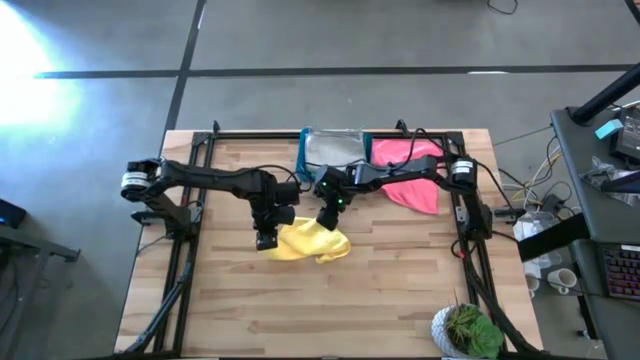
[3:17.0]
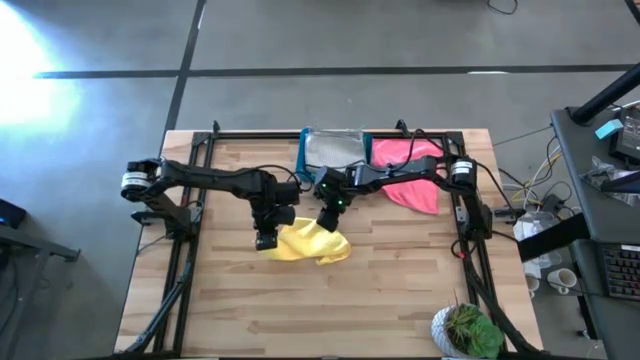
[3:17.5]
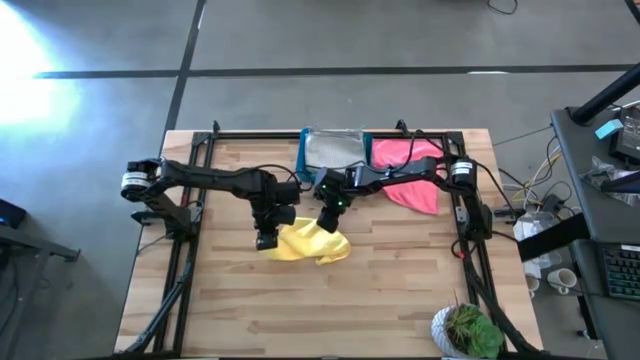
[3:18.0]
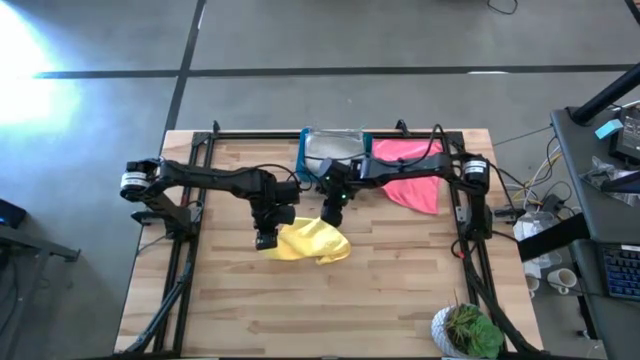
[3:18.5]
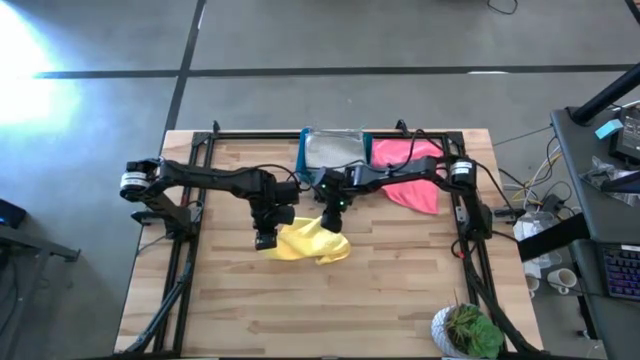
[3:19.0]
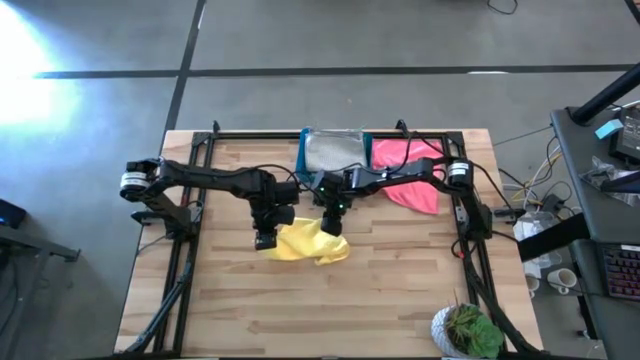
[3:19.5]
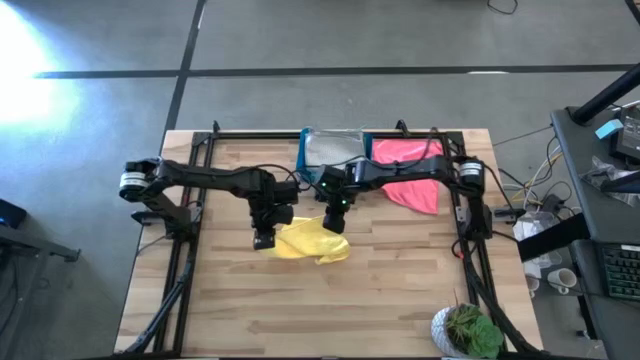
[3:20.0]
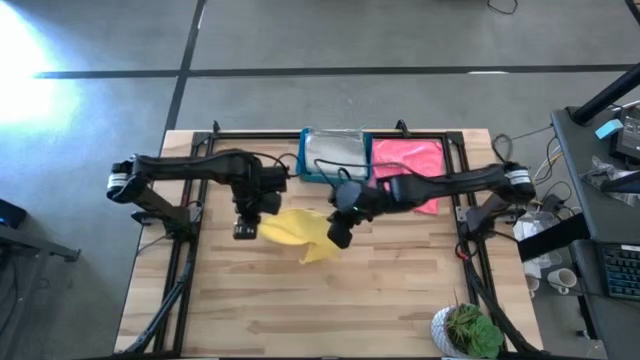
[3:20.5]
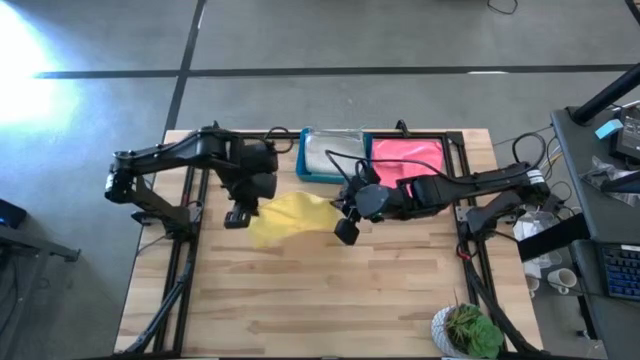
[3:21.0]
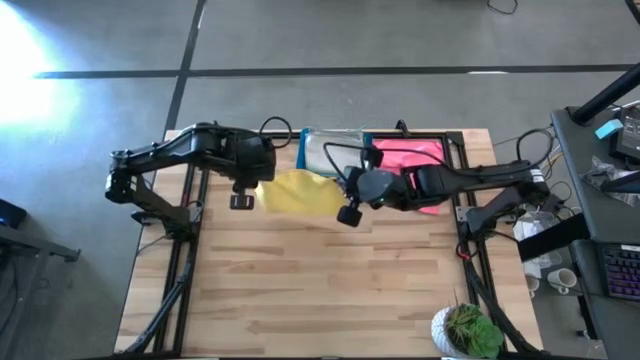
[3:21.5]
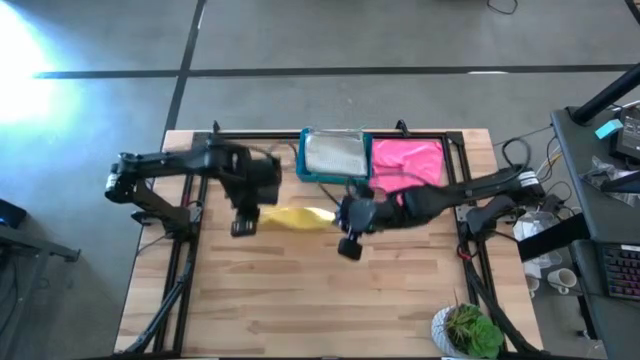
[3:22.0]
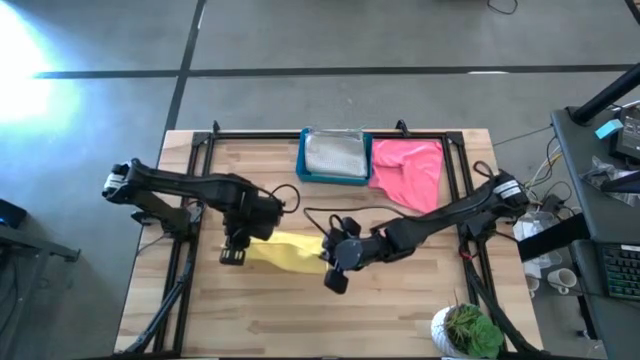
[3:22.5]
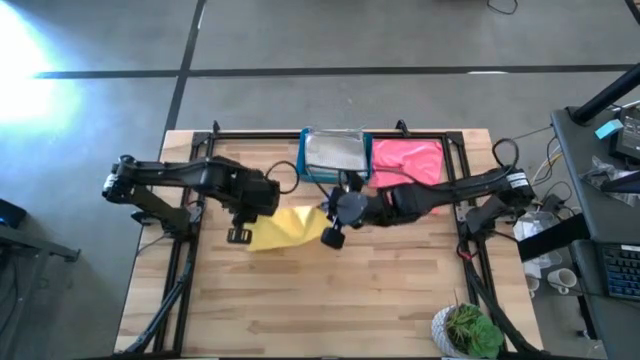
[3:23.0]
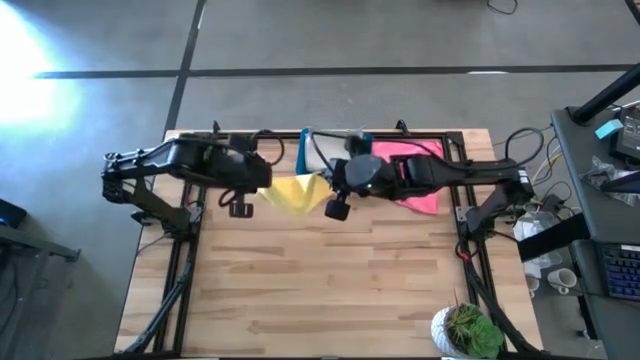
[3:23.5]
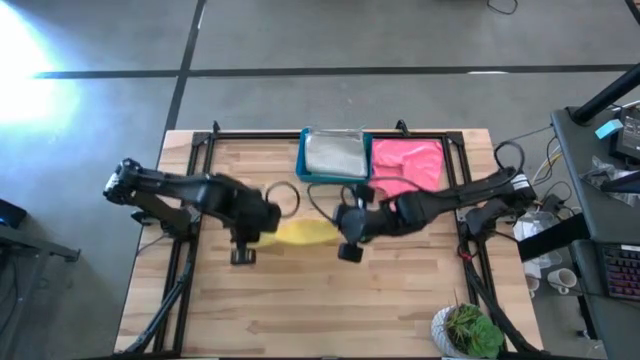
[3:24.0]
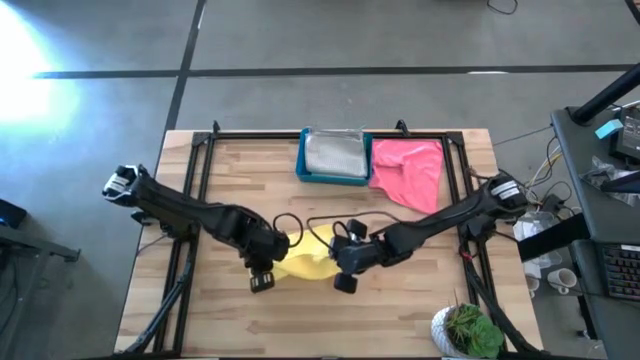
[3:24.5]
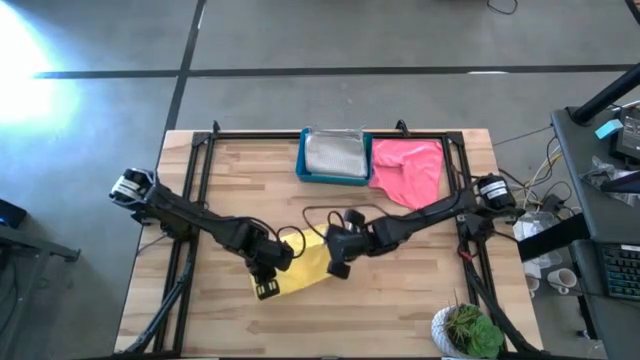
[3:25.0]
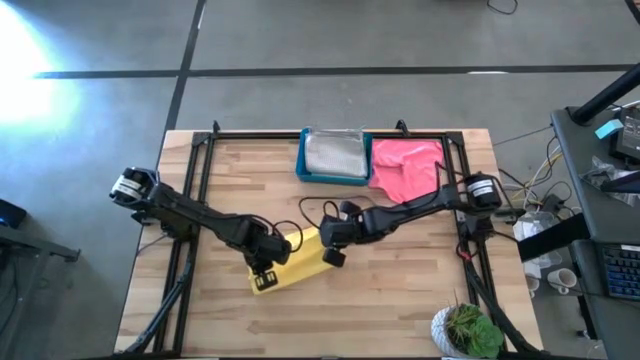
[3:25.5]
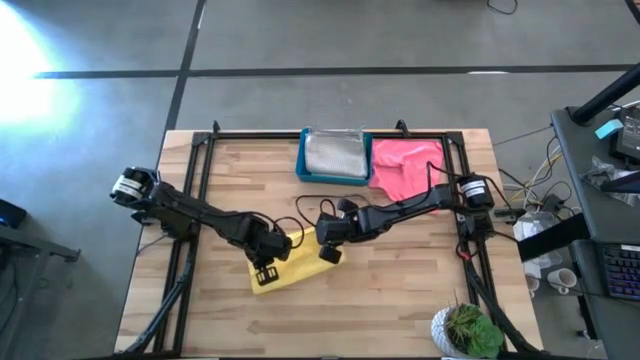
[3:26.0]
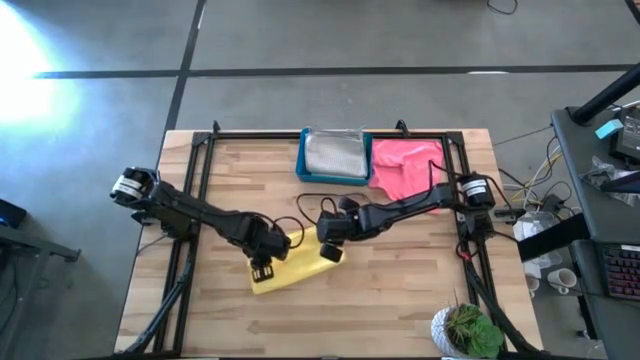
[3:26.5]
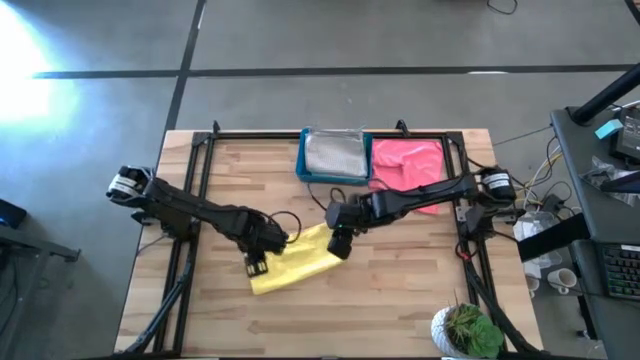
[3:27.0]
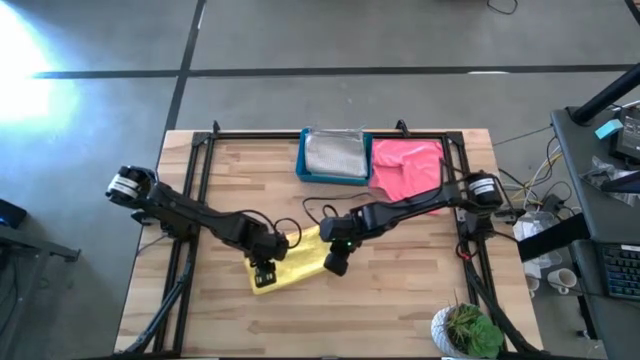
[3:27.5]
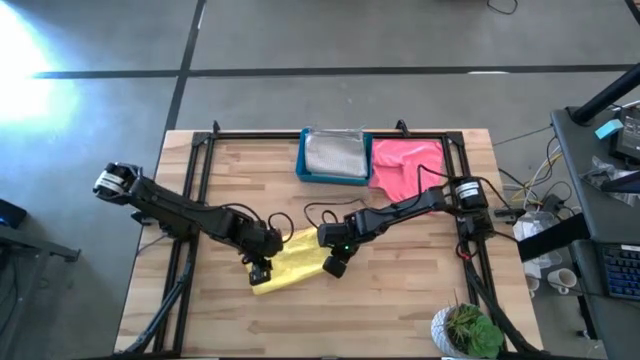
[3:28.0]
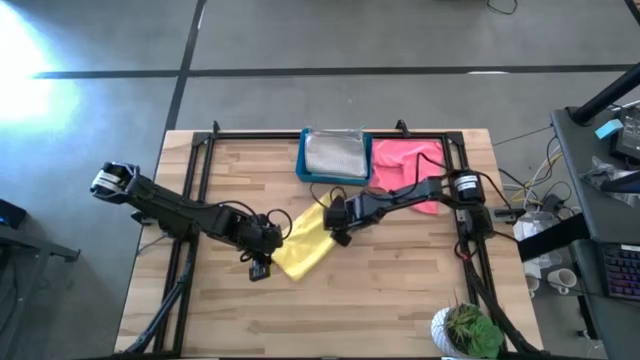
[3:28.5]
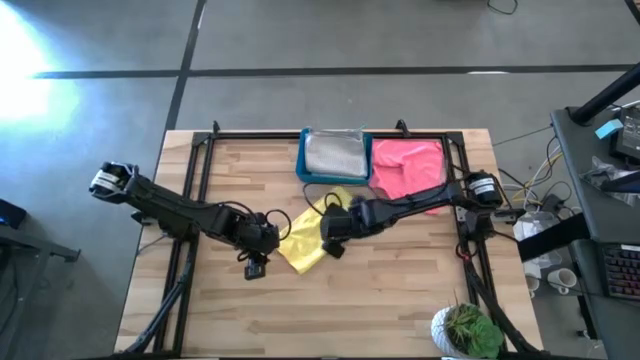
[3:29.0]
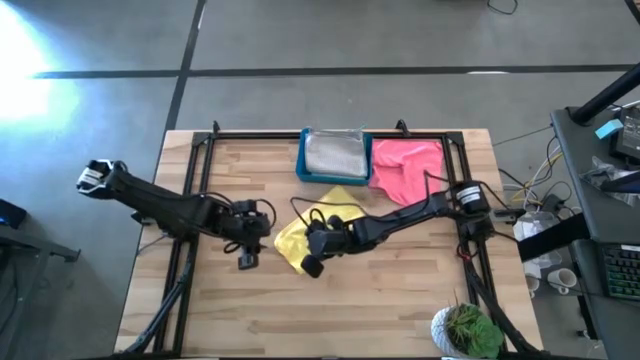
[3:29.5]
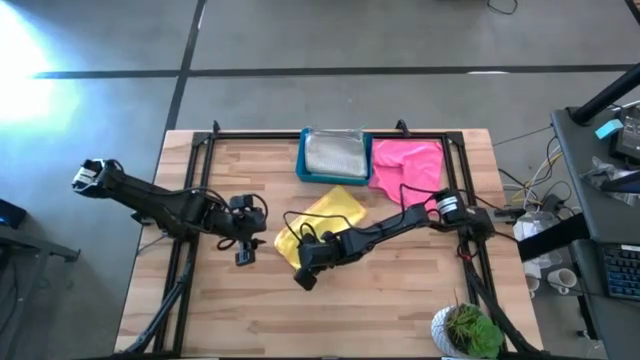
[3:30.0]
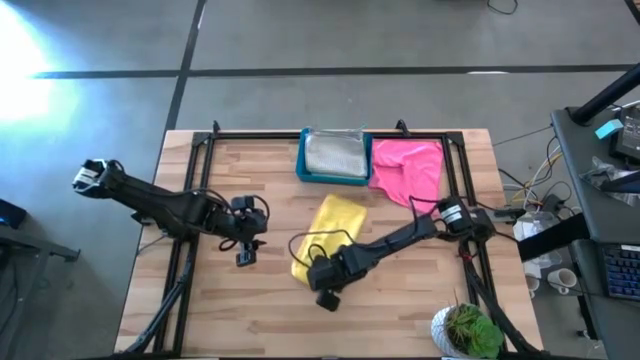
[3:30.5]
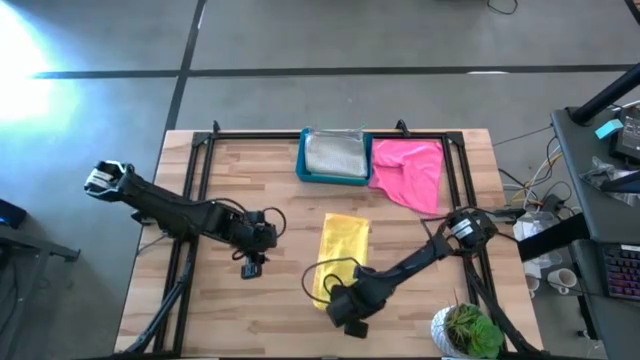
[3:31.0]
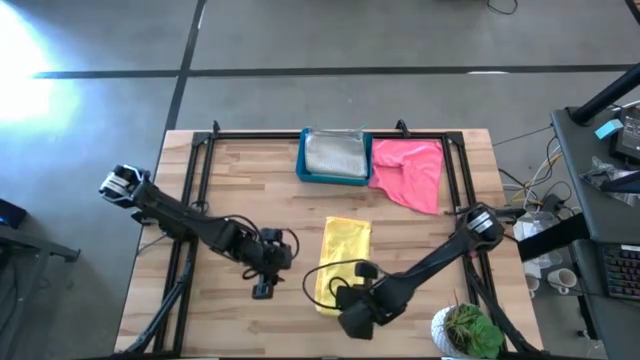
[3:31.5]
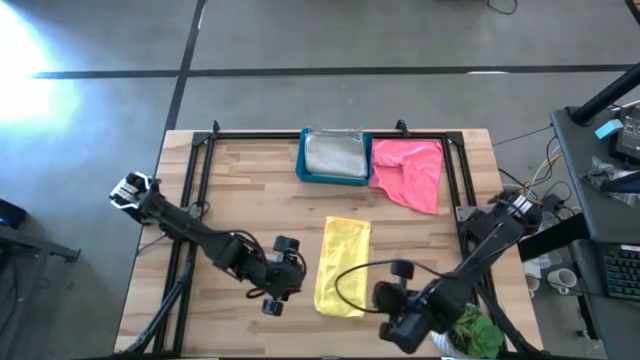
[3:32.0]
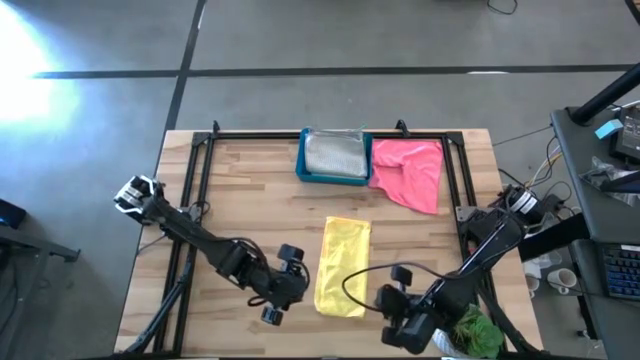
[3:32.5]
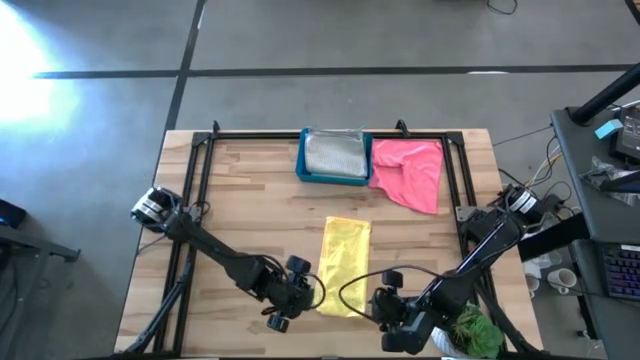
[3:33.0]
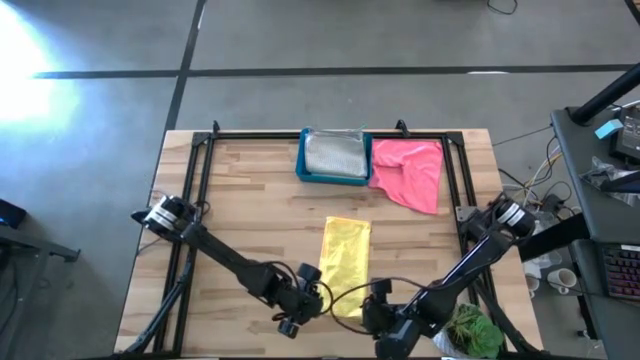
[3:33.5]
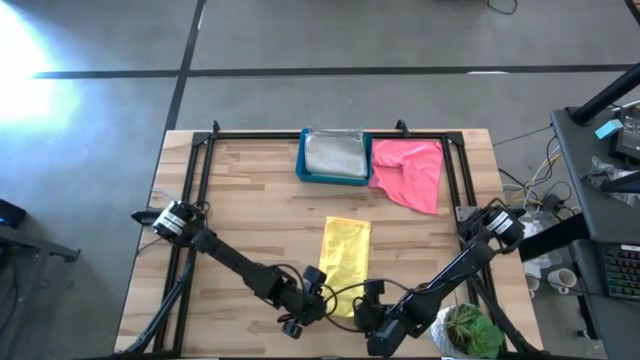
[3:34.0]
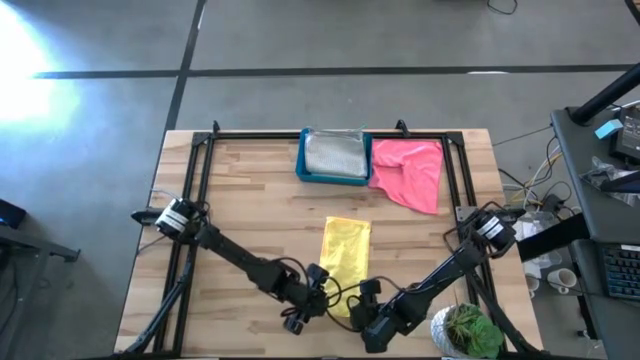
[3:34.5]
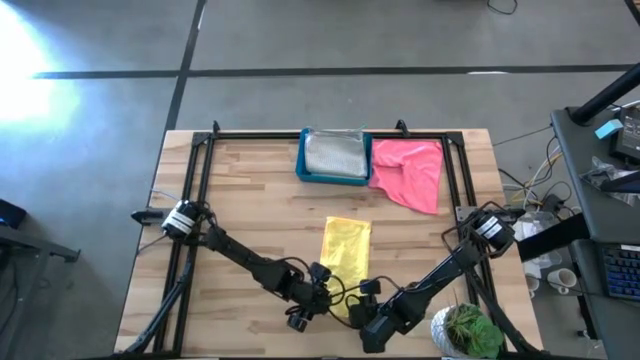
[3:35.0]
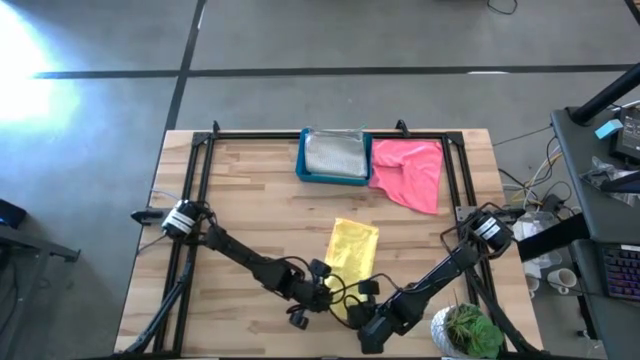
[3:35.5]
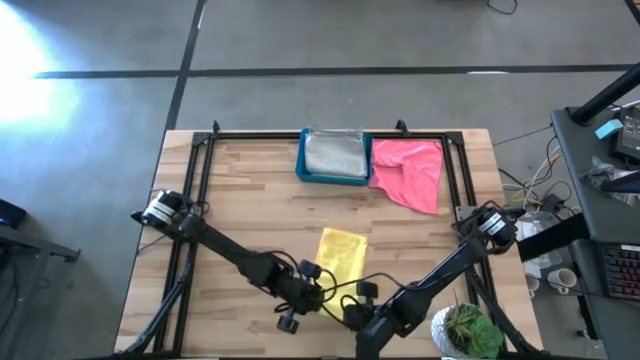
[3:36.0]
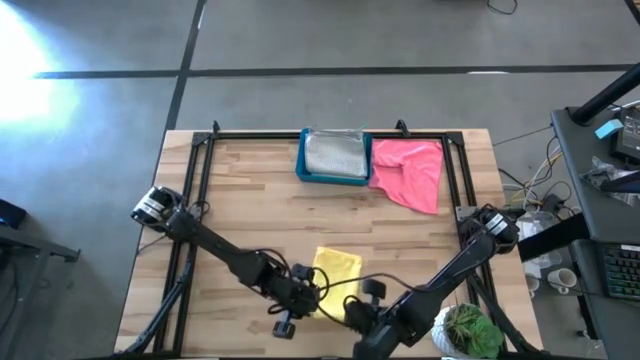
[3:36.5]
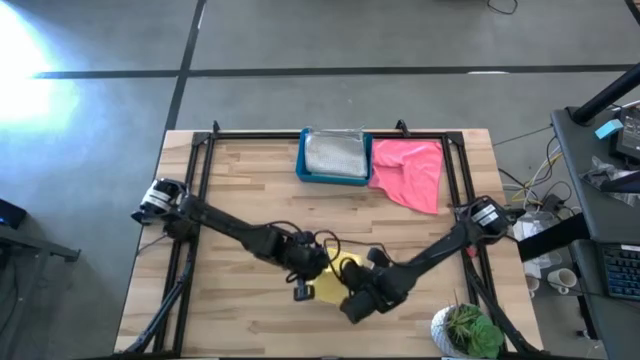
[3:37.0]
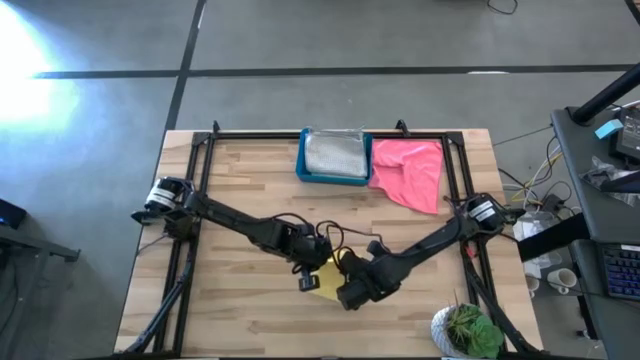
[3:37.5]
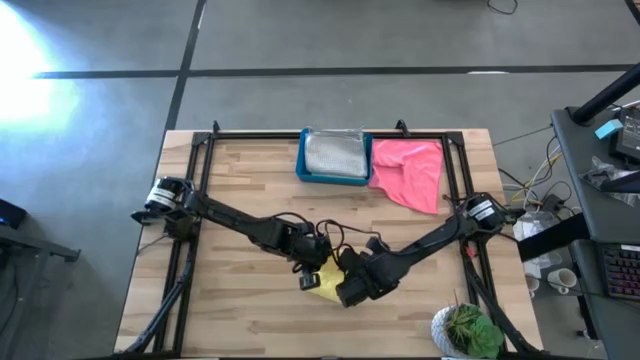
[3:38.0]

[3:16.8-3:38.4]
Task: Fold microfiber towels
Fold the yellow microfiber cloth
